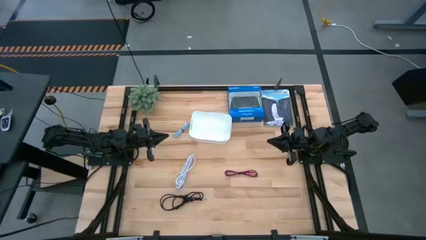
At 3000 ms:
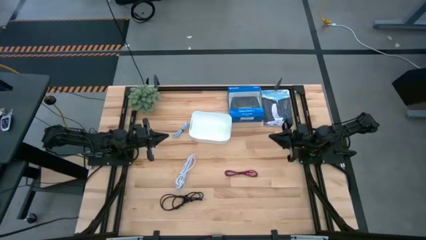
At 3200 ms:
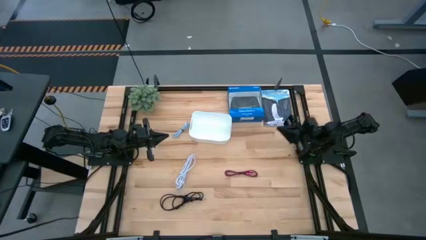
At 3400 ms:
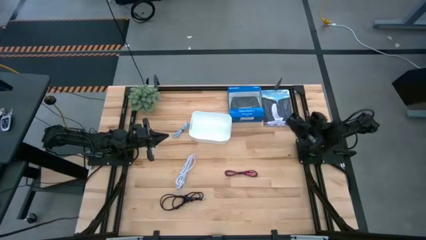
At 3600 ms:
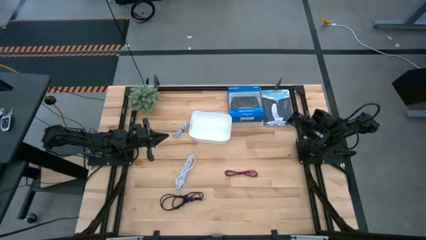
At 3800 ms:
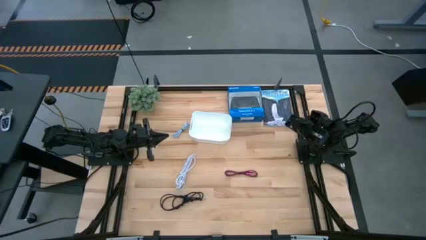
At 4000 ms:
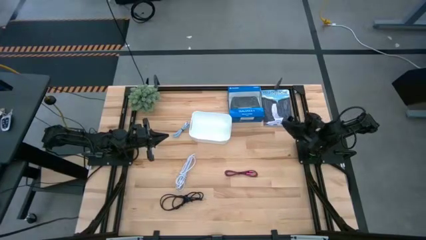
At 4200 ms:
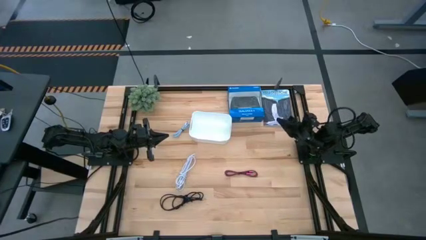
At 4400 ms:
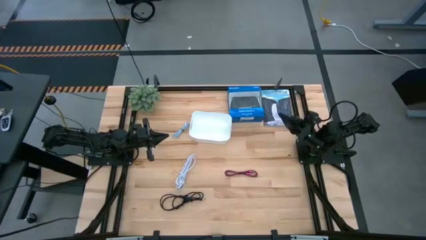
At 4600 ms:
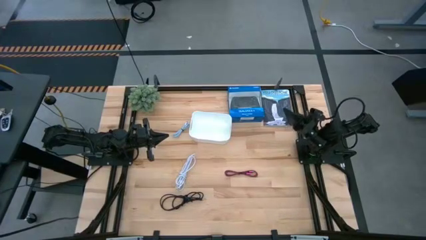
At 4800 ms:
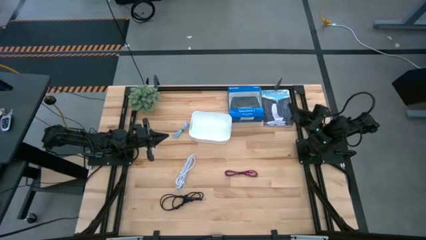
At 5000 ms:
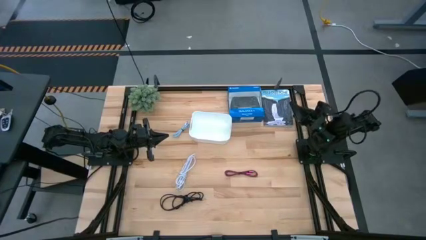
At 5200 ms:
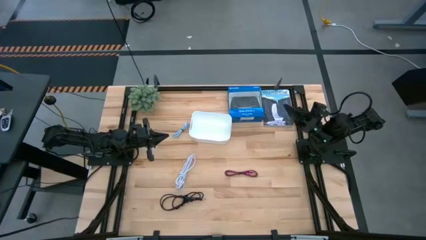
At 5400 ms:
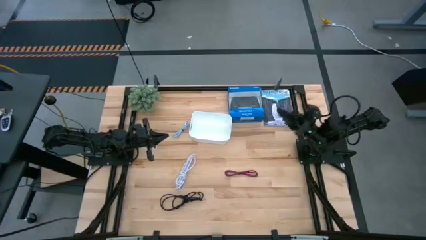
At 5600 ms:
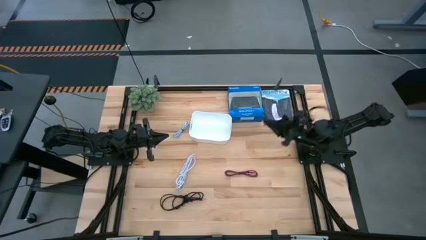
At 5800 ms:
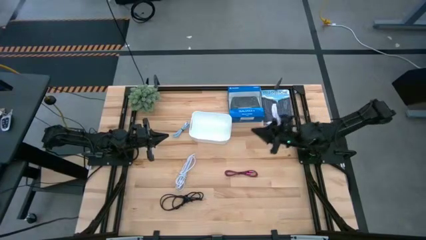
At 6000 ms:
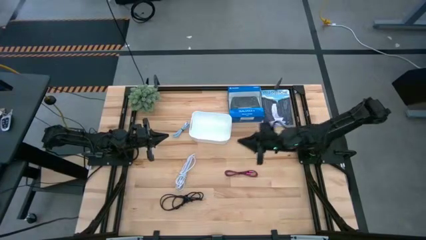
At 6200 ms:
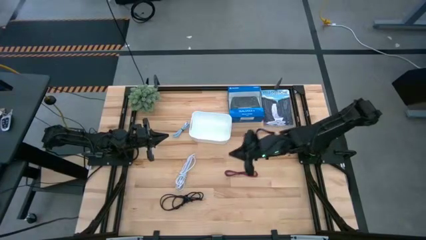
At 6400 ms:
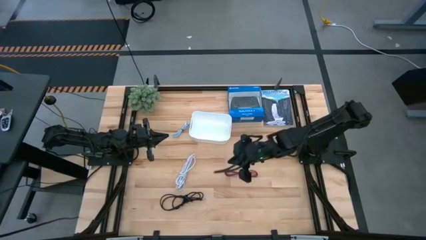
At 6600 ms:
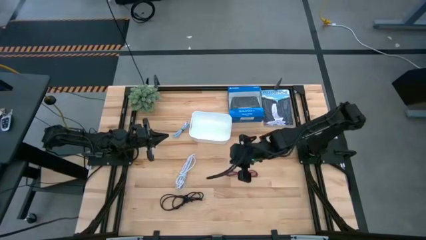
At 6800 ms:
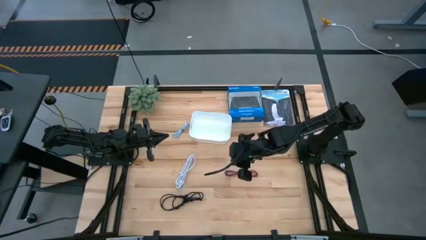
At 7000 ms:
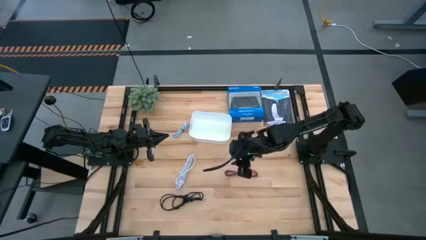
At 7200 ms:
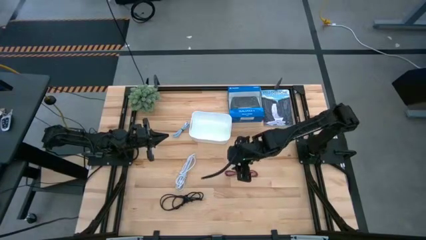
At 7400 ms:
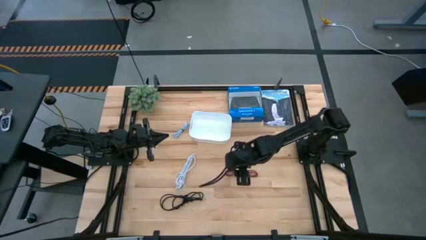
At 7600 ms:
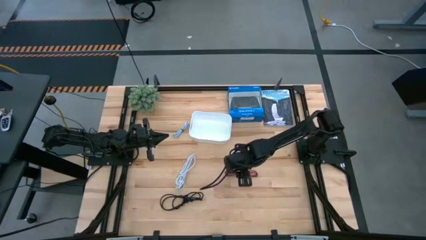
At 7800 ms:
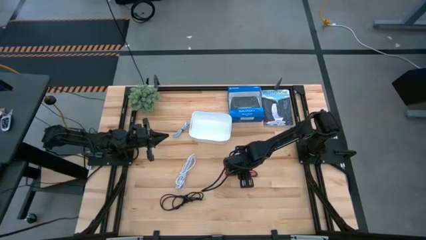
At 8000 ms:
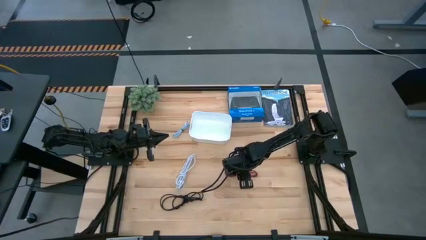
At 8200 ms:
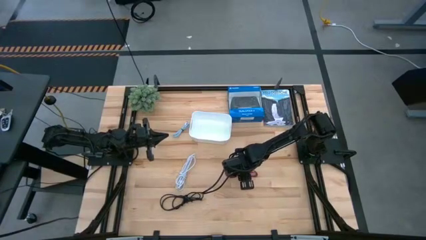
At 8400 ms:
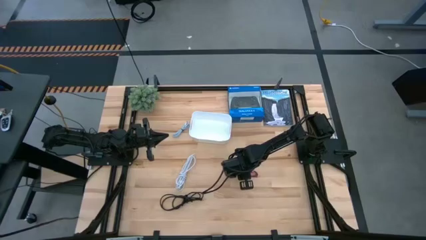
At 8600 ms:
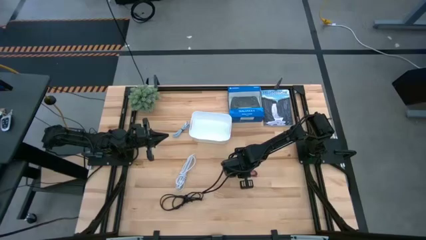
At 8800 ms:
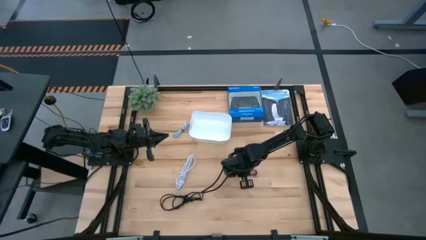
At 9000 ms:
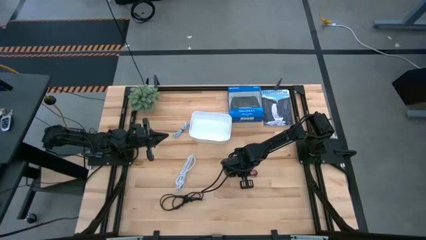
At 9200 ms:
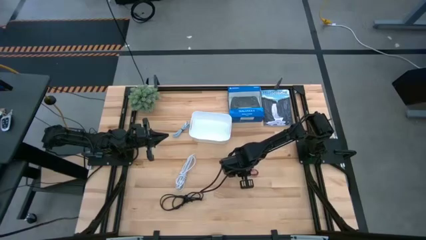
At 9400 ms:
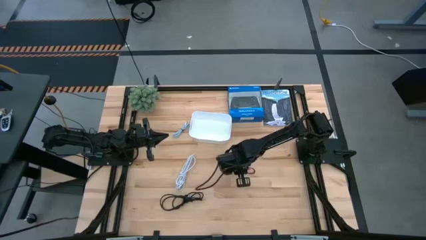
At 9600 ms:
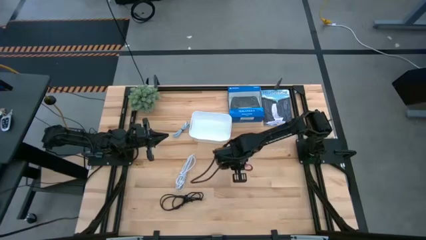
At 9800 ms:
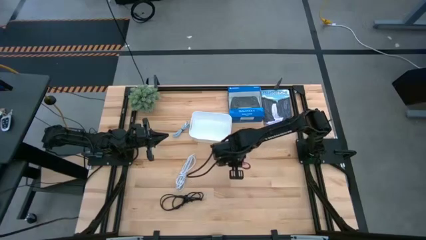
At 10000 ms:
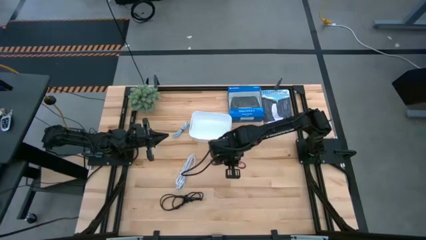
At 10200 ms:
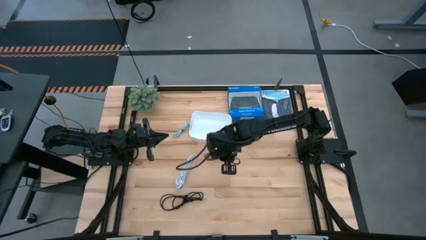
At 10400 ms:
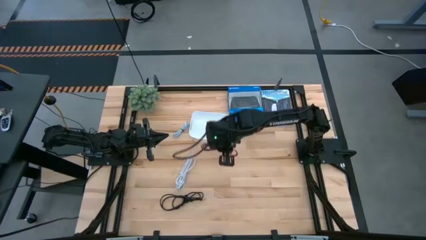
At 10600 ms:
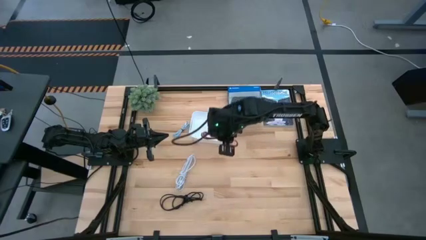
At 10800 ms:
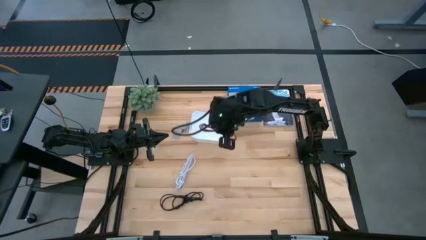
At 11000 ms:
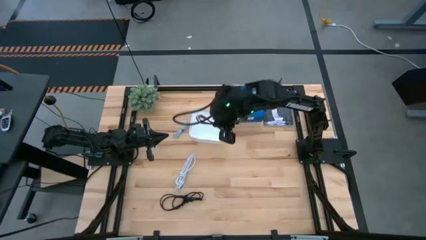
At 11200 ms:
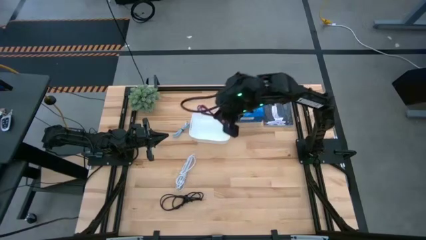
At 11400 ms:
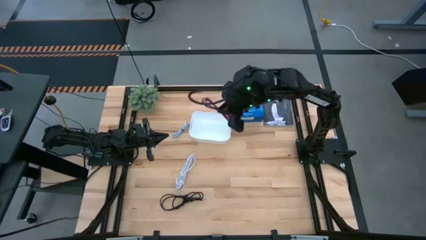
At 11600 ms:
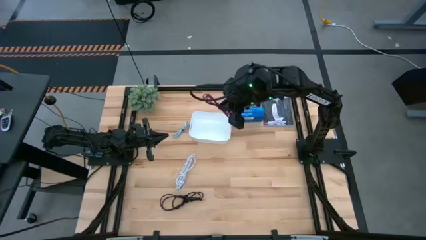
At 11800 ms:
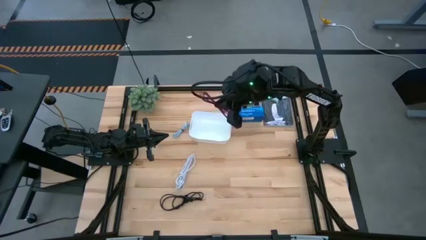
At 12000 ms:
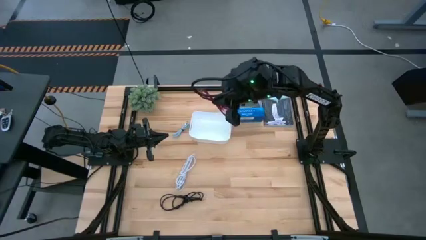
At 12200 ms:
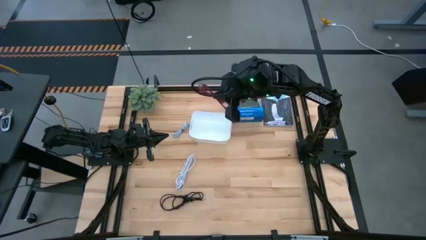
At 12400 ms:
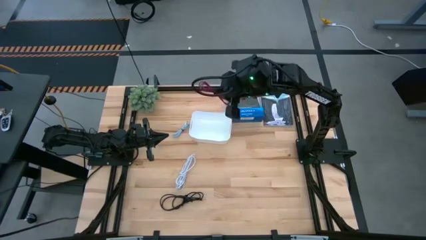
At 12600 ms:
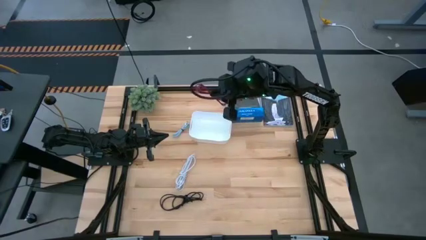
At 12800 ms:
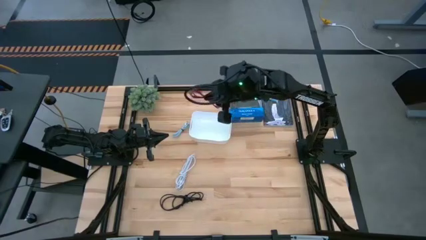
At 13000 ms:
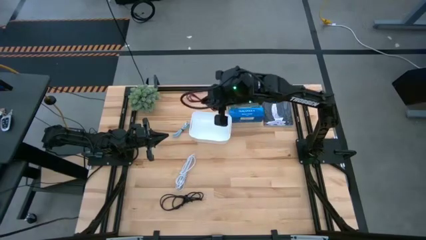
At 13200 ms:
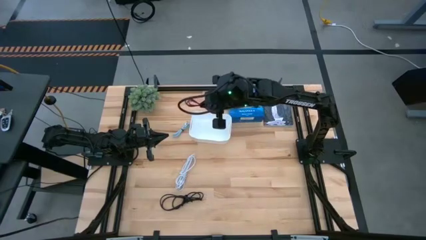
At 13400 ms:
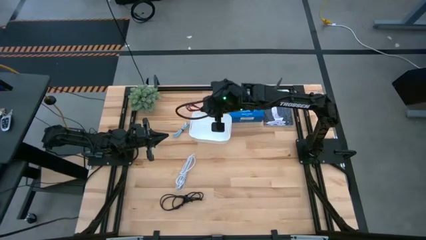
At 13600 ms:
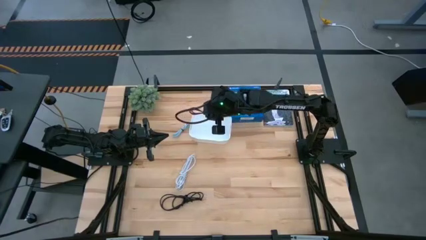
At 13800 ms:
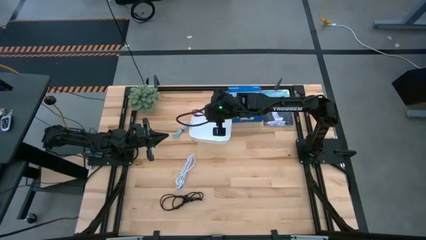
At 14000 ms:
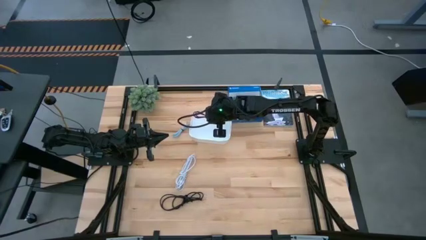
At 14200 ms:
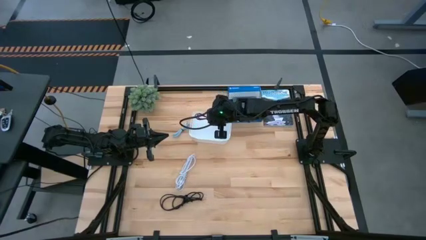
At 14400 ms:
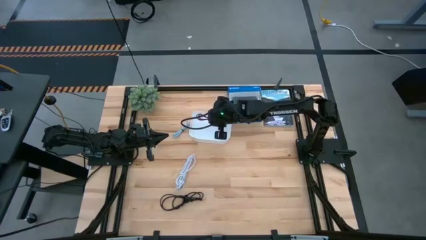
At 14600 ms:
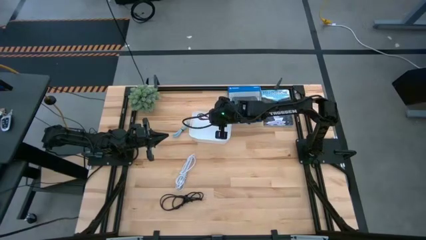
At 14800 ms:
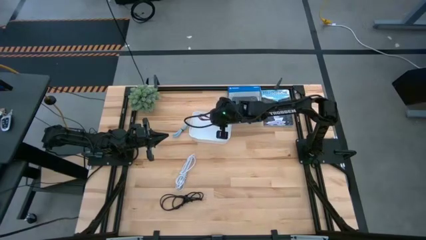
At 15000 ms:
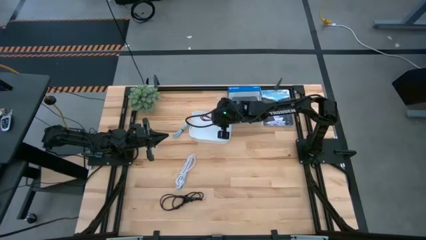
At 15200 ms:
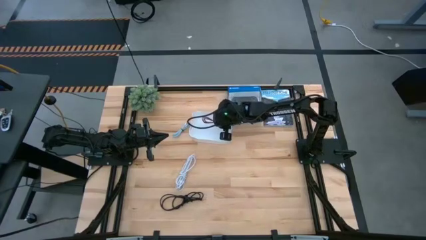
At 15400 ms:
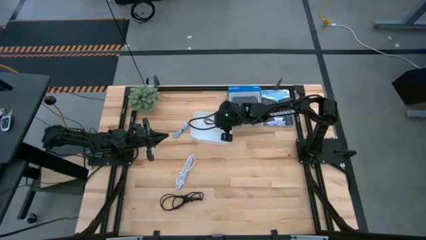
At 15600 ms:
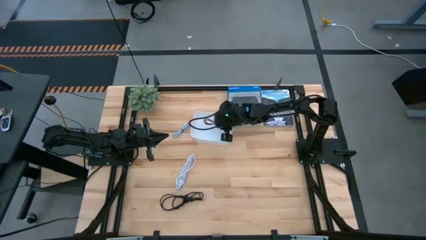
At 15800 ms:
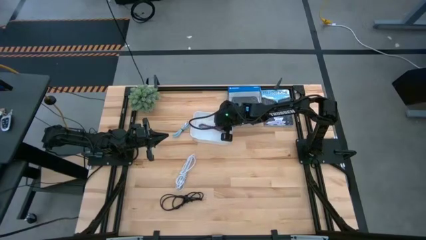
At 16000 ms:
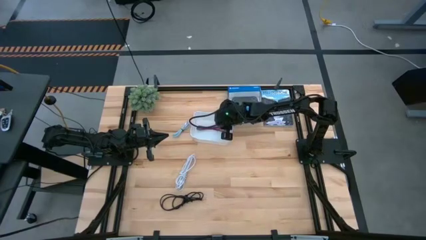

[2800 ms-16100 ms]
Task: Pick and place USB-C Cables
Put the red charger cable into the white bin

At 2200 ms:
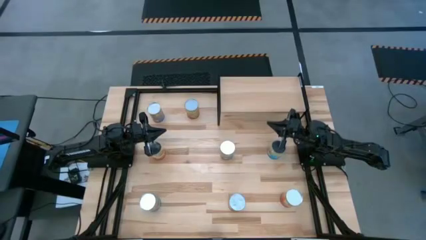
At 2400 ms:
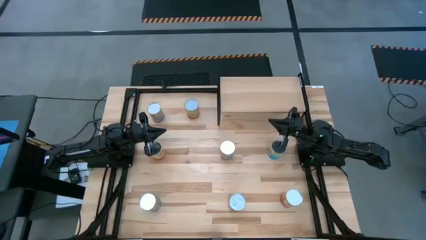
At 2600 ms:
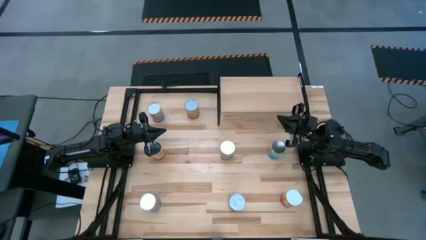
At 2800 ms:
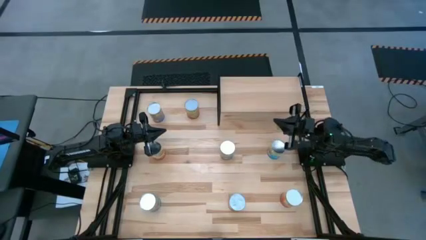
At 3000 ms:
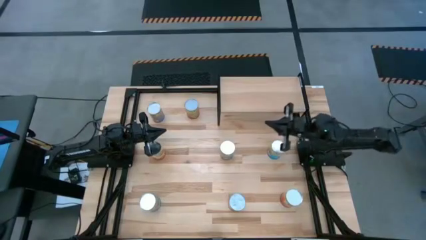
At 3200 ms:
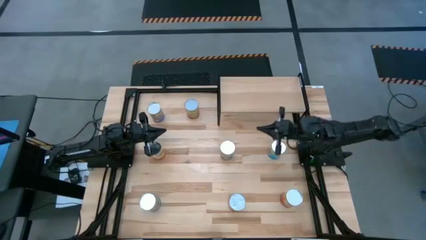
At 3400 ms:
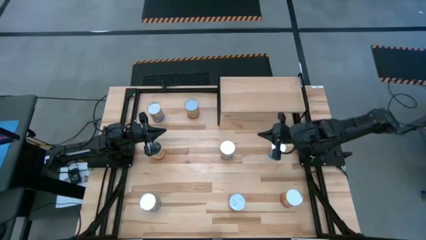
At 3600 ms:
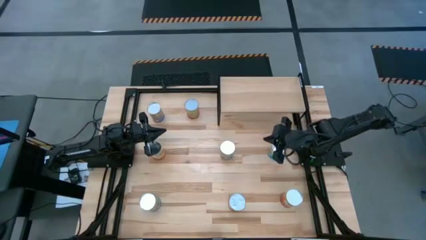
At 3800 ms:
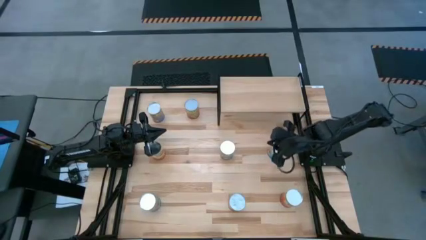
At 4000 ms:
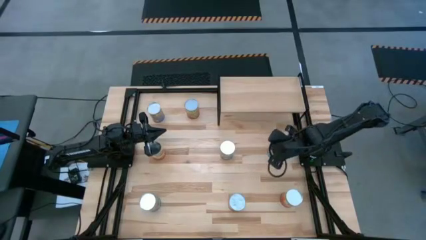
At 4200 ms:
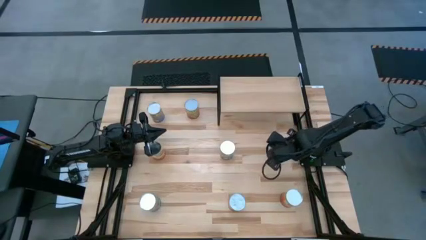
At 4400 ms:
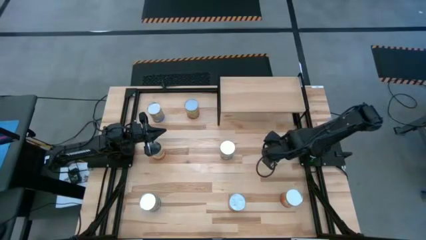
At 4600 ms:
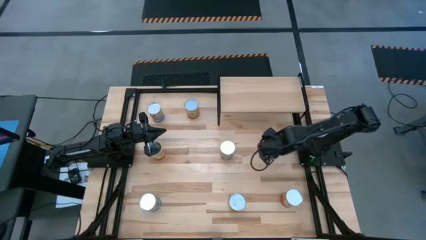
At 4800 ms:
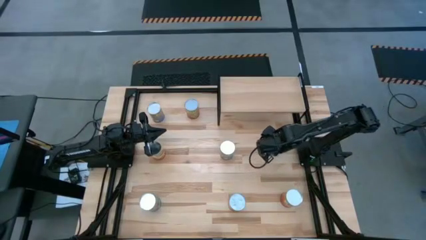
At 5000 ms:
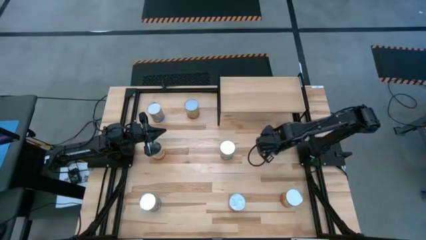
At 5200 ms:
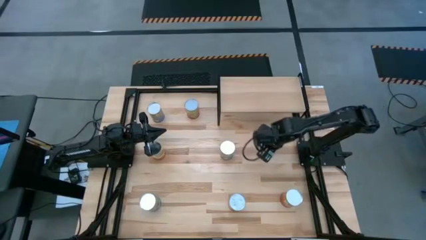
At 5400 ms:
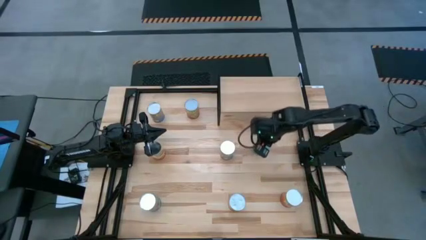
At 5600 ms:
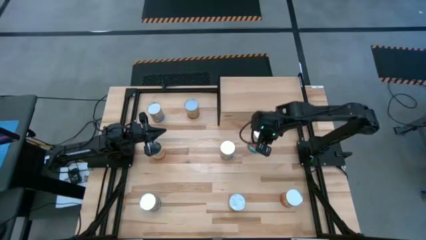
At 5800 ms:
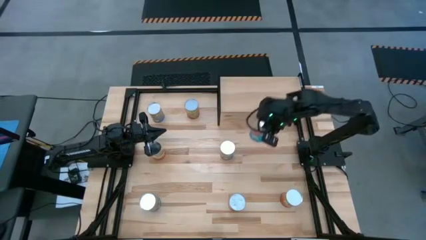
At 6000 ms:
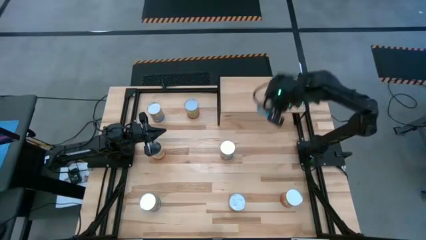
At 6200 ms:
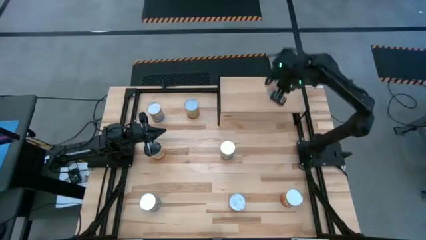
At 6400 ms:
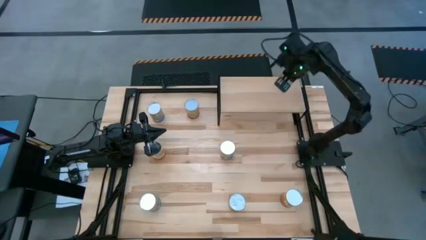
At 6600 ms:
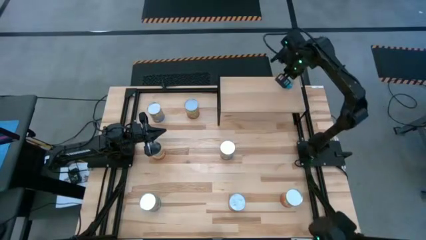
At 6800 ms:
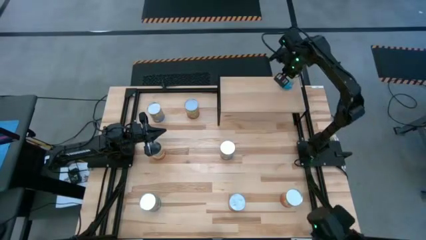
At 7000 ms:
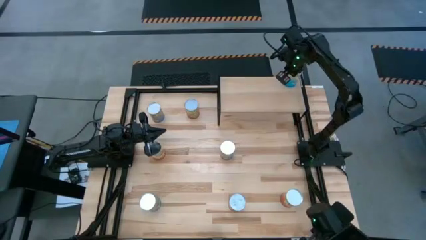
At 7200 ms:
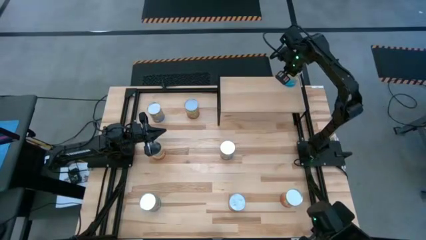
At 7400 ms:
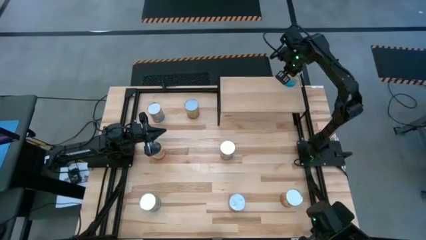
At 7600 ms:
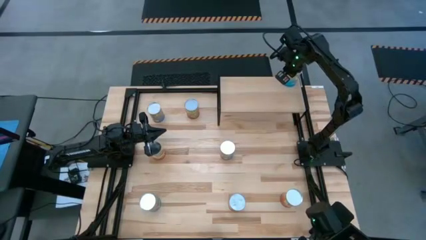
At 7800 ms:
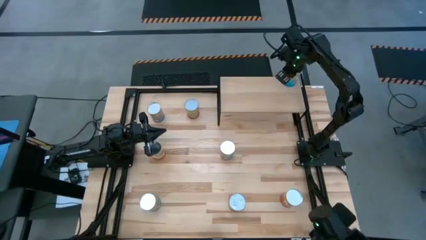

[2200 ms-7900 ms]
Task: Pick and place cans onto a shelf
Put the top canned tomatoes on the shelf
